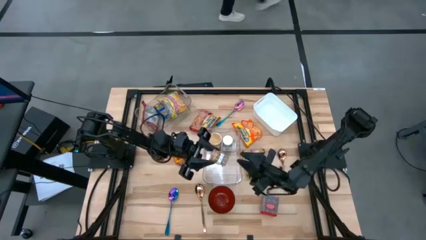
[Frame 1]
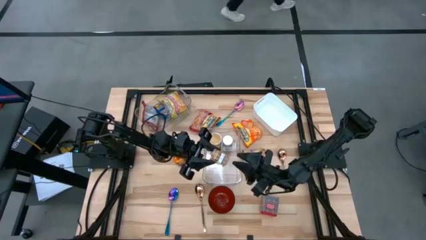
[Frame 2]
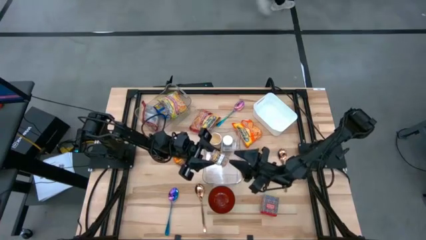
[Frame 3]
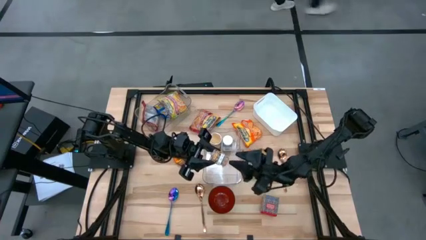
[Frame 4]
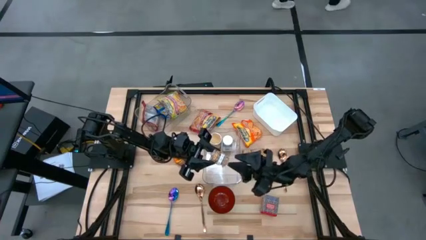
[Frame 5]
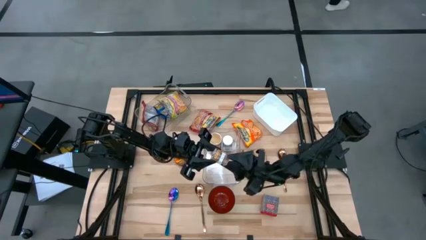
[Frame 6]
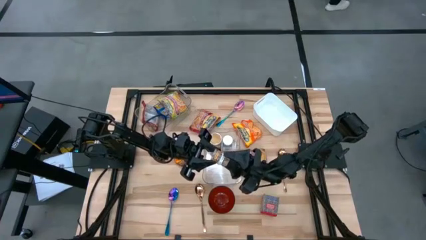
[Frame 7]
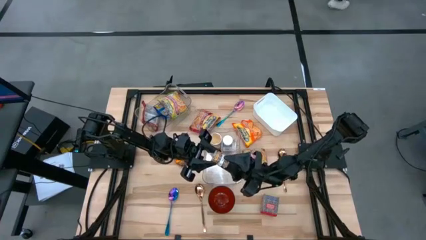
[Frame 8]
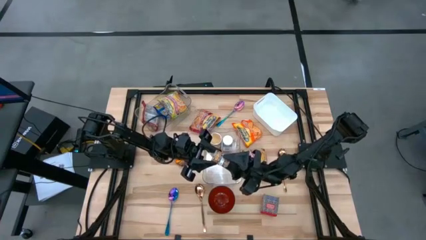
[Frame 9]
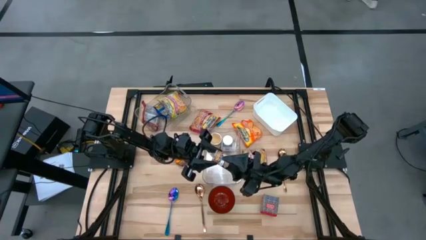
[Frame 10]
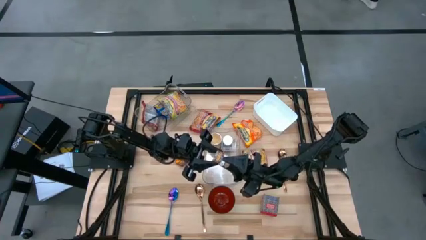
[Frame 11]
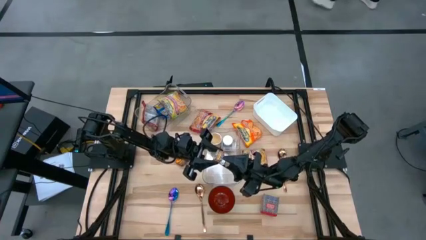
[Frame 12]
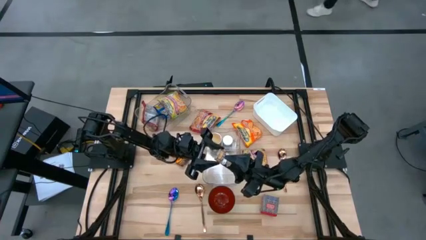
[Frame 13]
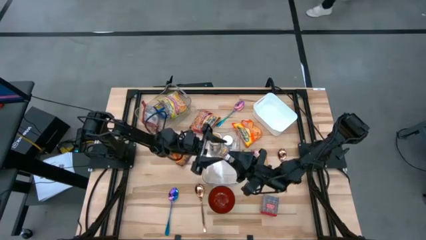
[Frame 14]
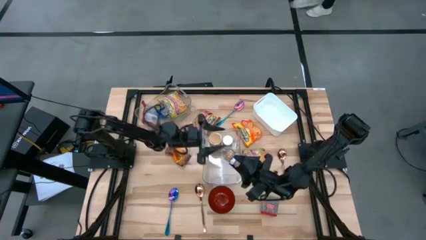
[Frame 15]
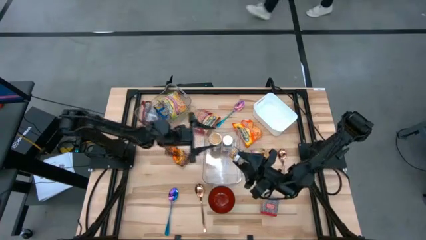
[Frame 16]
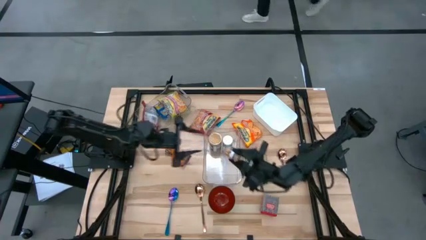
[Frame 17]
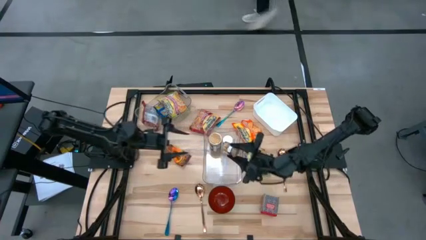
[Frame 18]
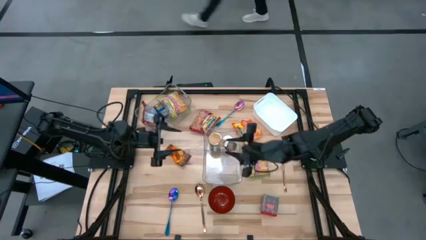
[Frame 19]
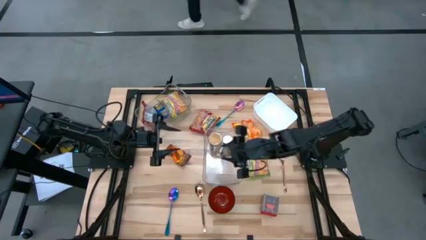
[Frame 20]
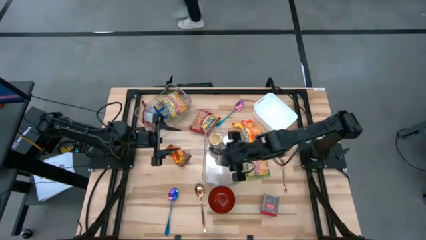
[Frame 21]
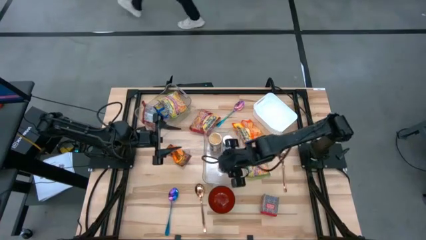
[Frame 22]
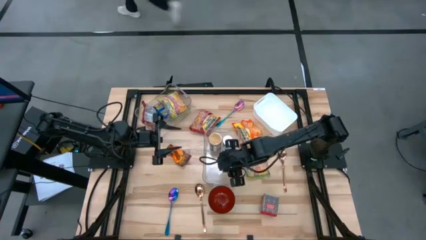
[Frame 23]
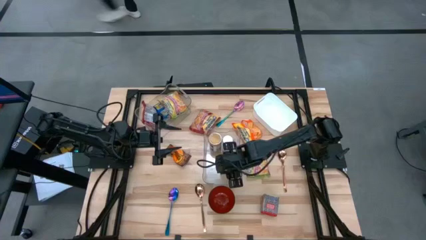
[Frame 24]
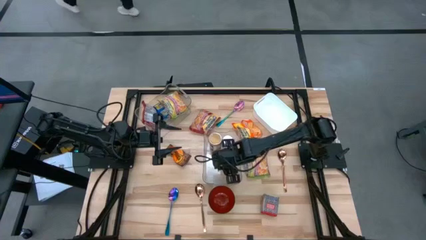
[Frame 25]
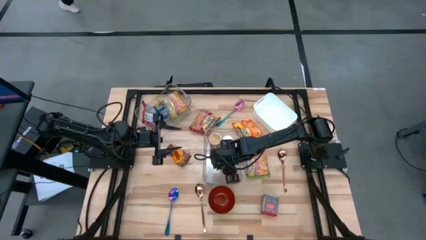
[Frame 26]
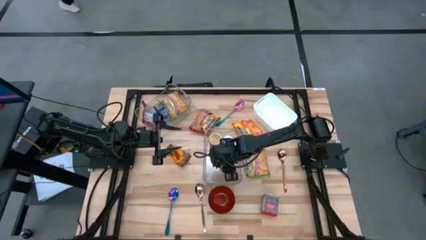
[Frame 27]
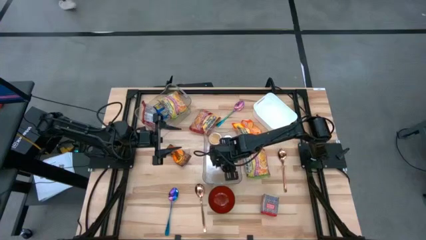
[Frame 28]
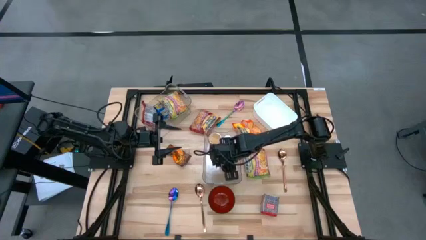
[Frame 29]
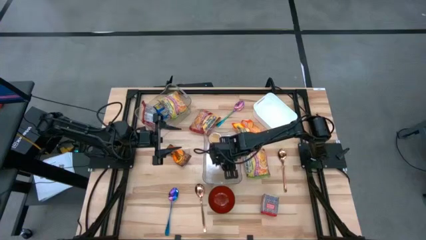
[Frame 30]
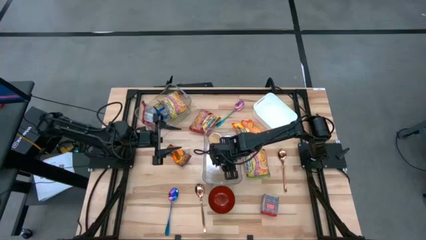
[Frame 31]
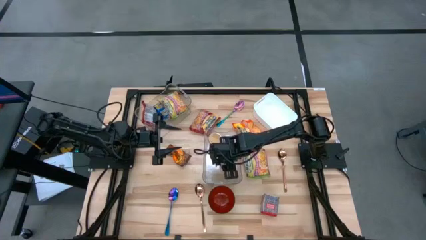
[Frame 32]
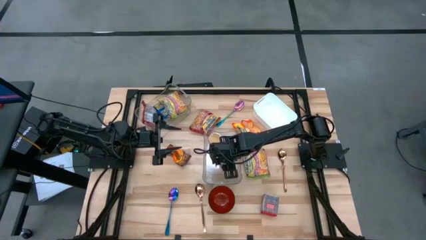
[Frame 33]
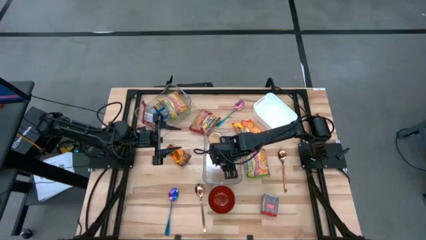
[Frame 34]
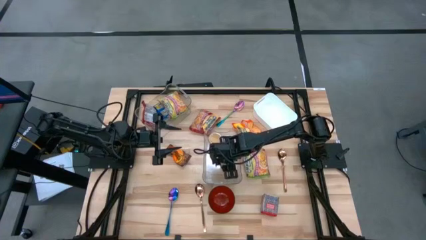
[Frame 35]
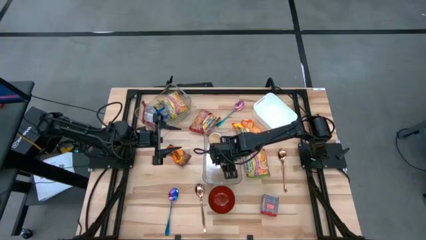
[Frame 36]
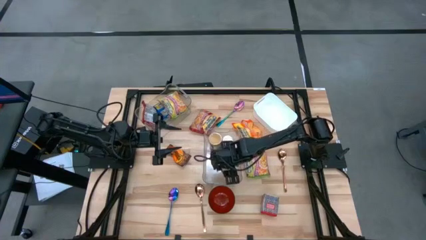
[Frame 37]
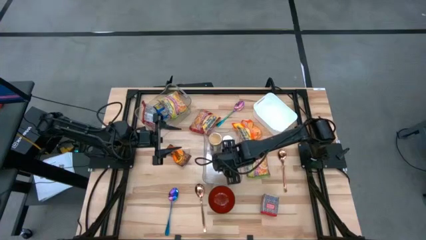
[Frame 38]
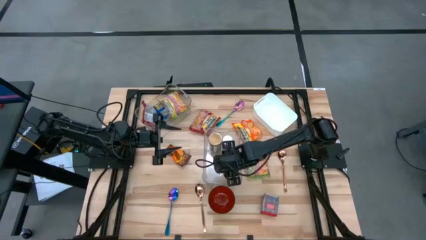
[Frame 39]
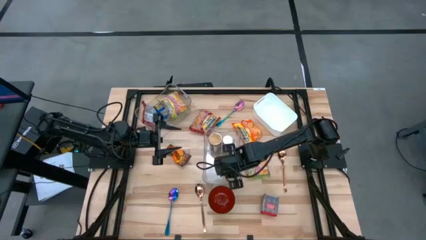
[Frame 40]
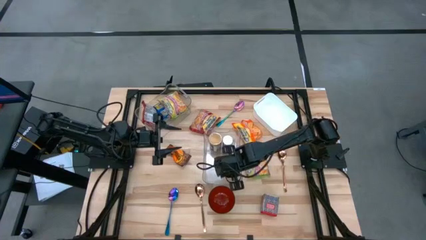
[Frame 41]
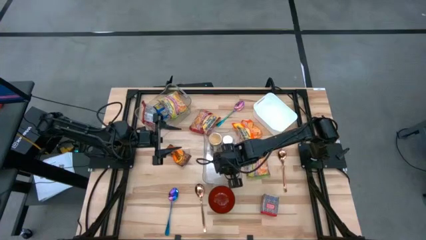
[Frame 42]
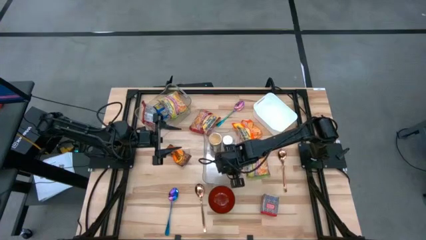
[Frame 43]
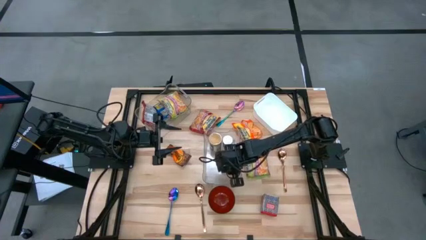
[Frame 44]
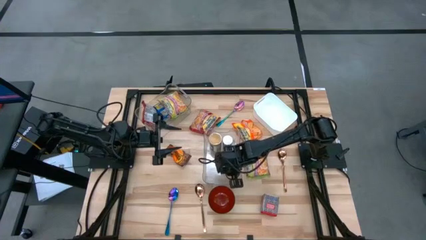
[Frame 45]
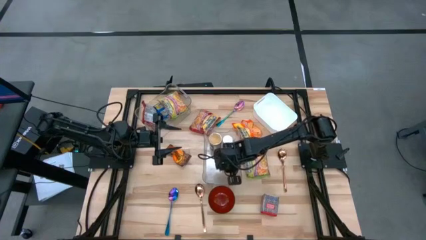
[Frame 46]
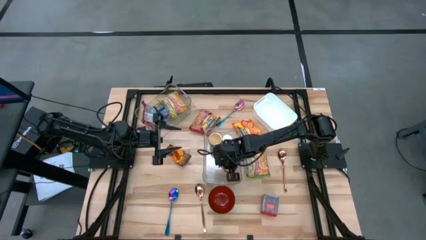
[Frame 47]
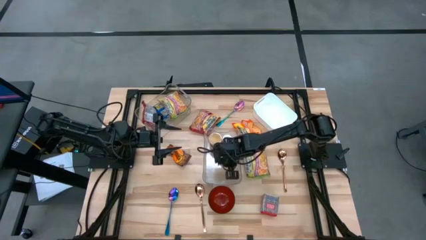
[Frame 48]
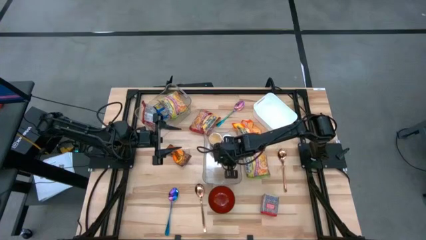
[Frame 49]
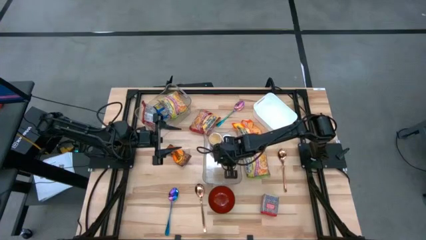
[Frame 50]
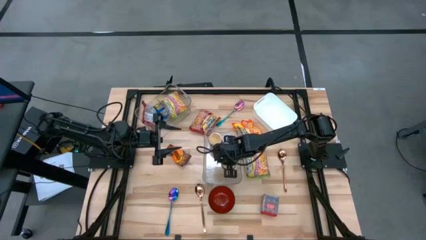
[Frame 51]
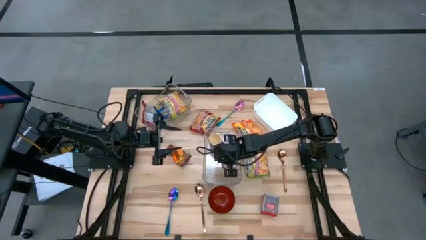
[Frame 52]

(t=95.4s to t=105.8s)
Task: Pick & Place Food Item
Put the brown spice bottle into the bottom transparent bin

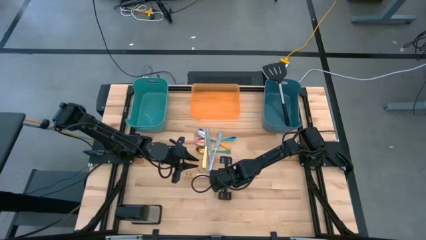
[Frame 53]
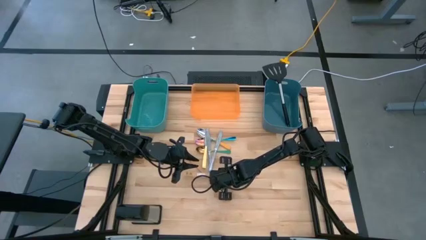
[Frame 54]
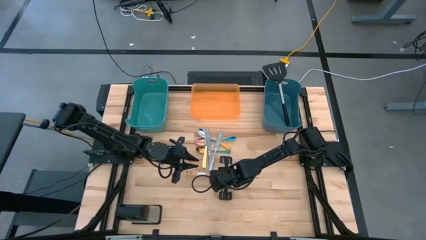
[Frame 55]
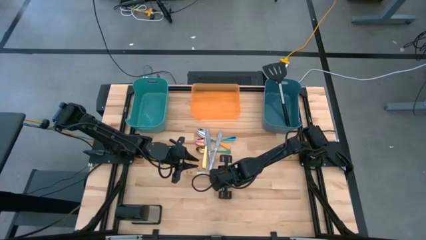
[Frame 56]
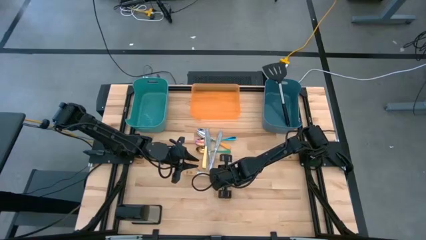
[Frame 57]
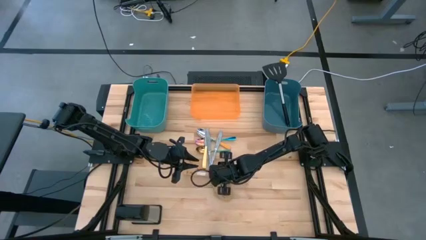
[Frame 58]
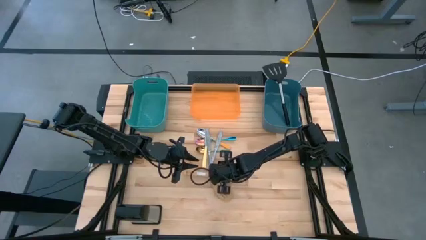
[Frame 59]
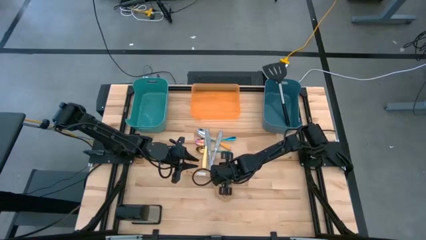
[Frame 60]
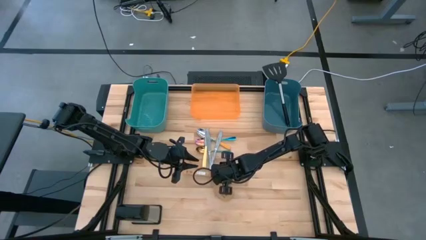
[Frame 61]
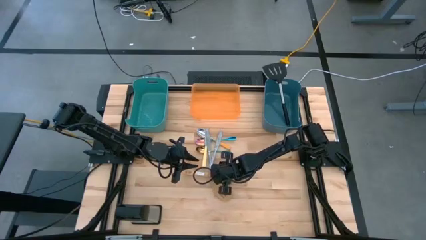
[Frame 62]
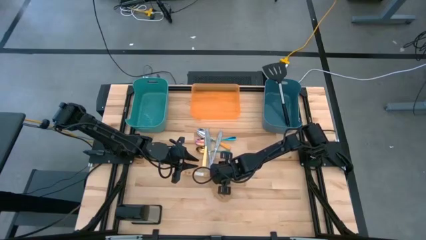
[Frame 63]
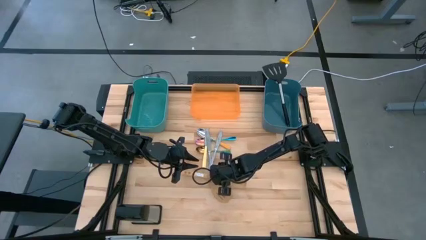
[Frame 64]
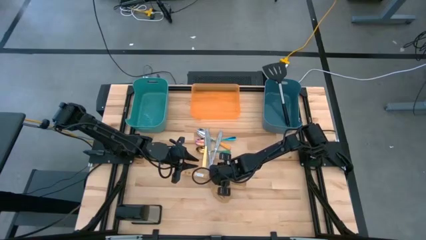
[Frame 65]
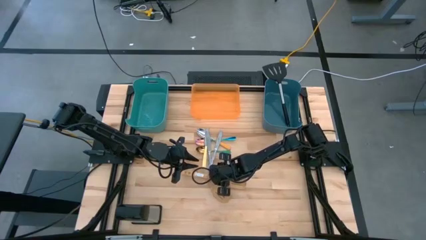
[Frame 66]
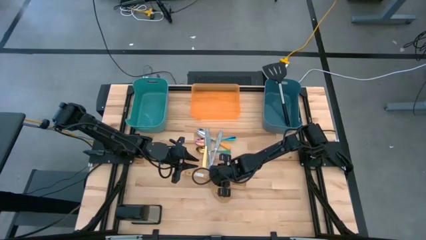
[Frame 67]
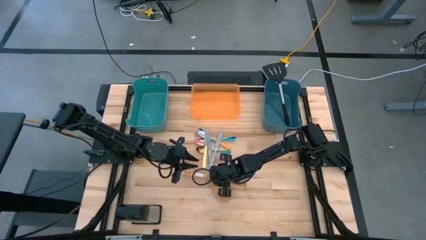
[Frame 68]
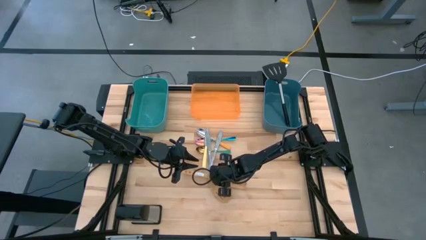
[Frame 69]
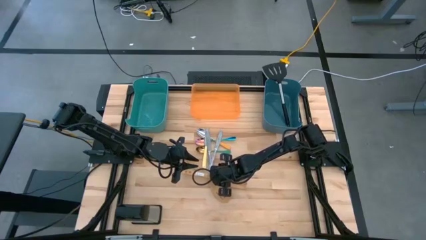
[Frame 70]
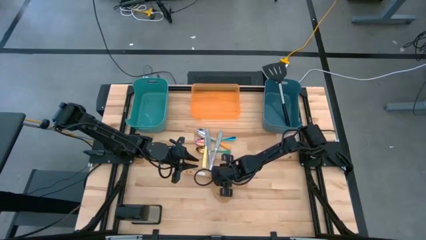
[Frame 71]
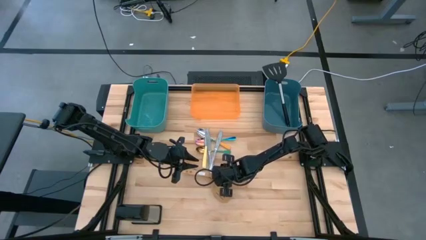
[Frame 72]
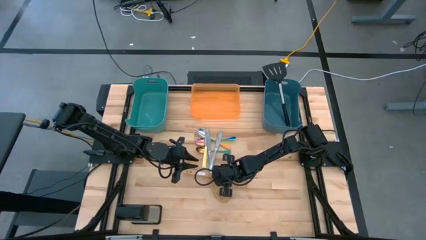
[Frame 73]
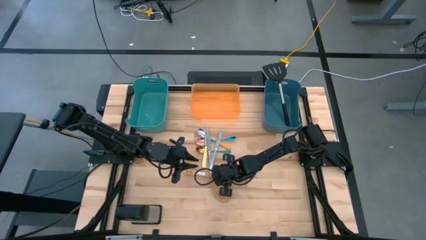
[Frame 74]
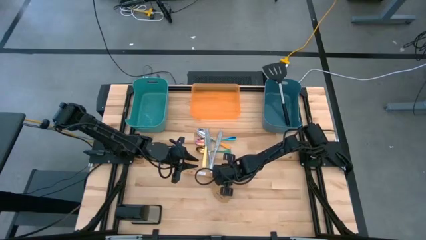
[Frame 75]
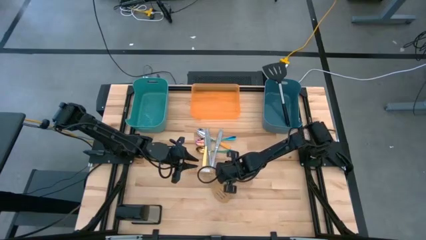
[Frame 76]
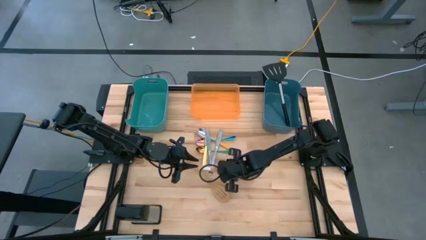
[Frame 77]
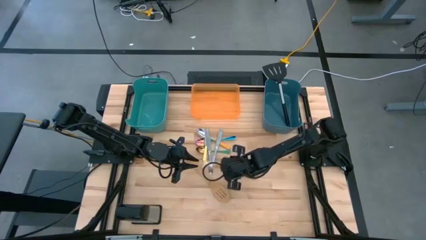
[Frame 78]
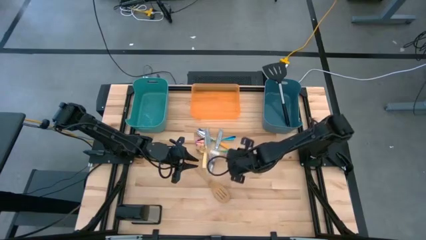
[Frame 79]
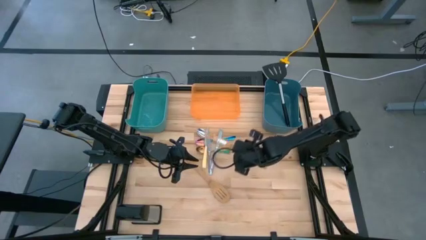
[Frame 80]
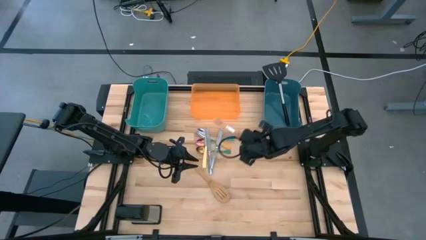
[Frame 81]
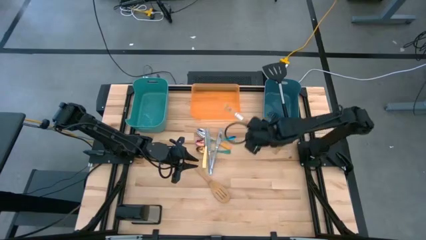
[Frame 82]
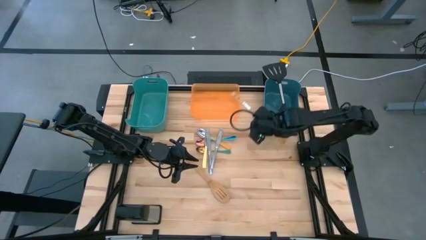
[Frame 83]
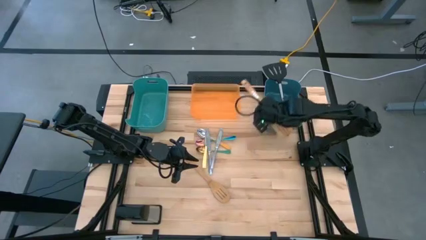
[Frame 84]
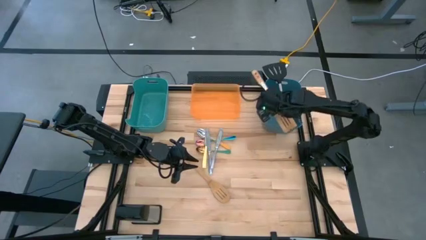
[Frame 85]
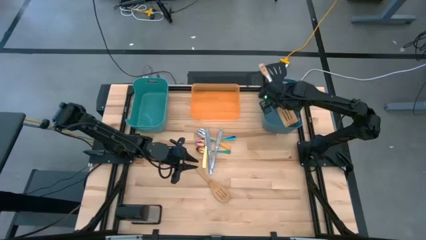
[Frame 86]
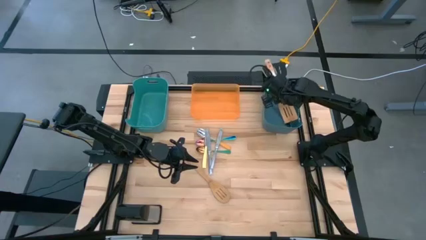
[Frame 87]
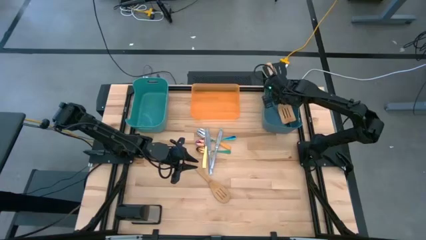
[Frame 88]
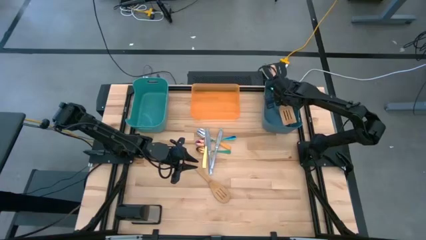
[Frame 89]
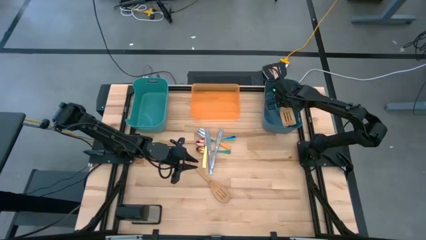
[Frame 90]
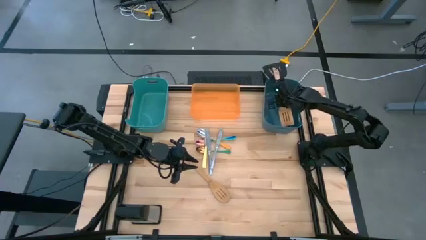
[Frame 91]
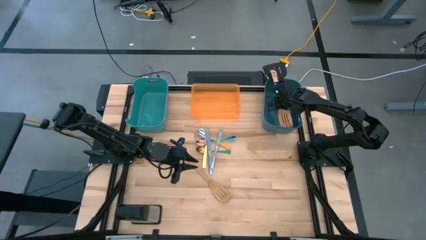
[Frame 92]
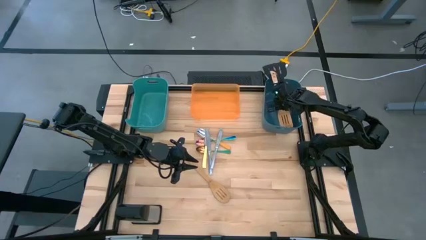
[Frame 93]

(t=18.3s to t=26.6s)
Task: Pick & Place Kitchen Items
Put the brown spatula into the blue bin
